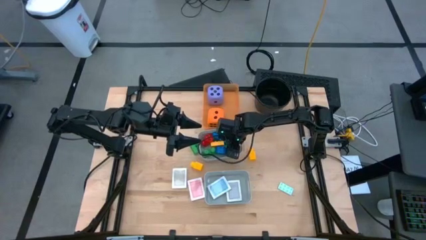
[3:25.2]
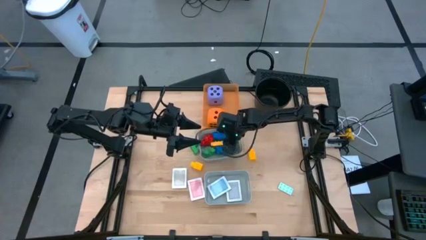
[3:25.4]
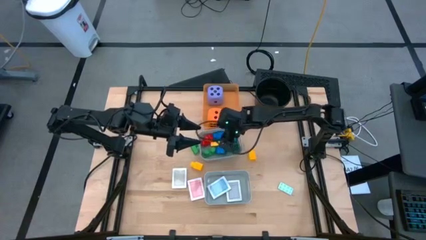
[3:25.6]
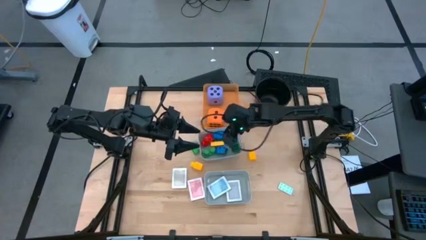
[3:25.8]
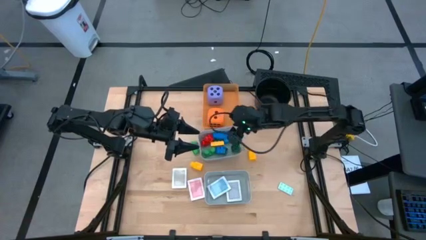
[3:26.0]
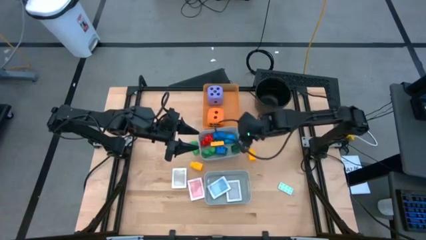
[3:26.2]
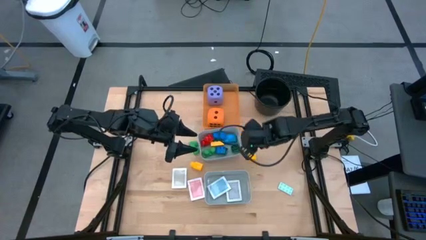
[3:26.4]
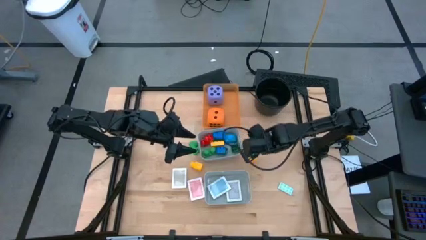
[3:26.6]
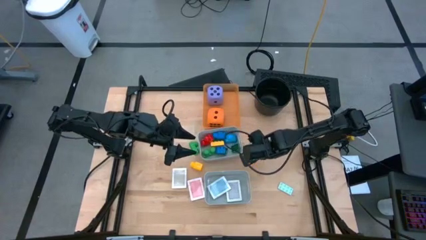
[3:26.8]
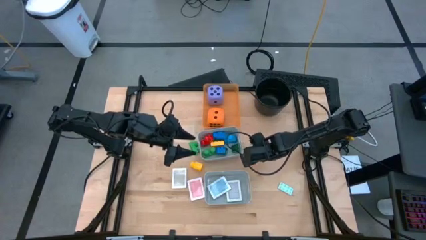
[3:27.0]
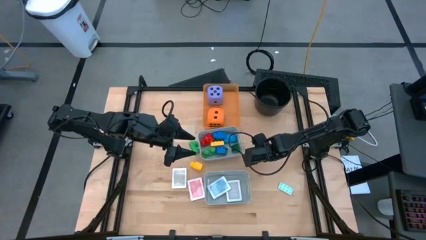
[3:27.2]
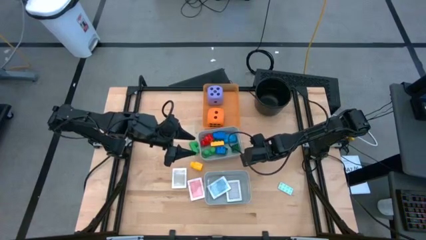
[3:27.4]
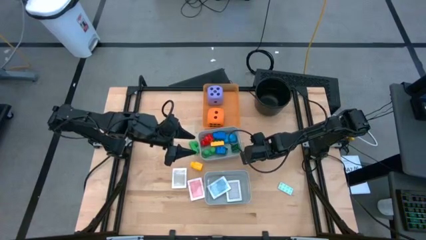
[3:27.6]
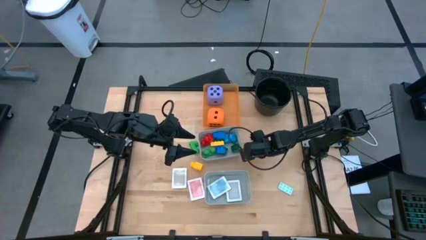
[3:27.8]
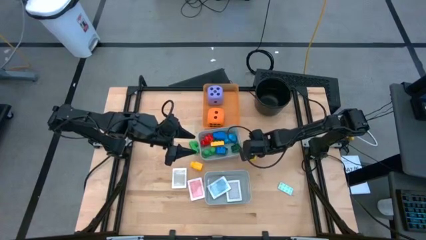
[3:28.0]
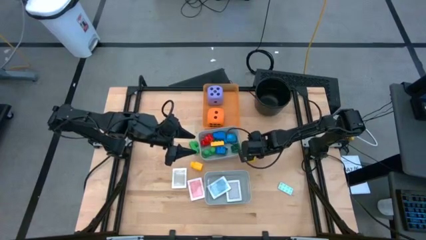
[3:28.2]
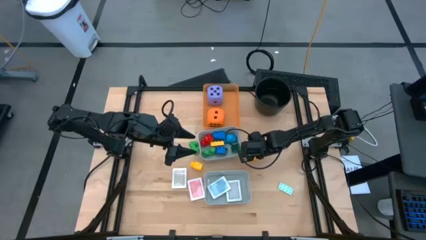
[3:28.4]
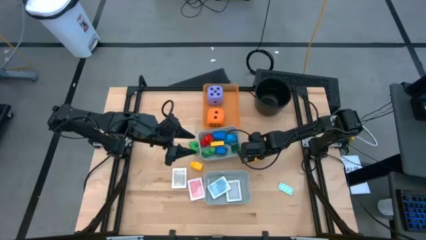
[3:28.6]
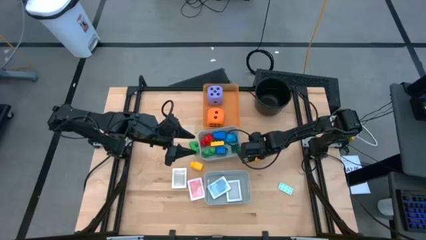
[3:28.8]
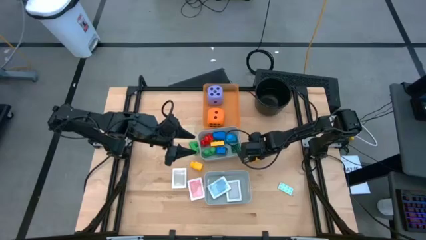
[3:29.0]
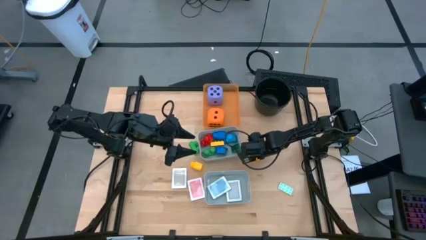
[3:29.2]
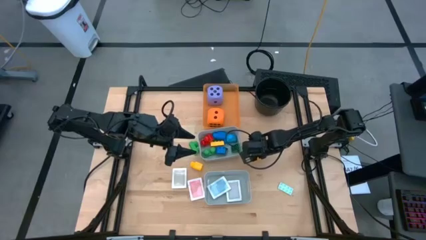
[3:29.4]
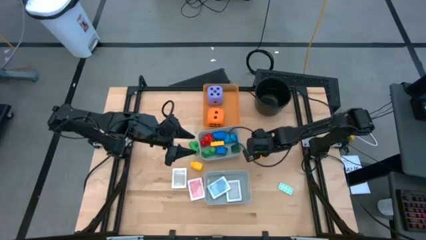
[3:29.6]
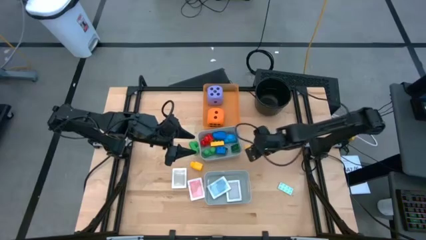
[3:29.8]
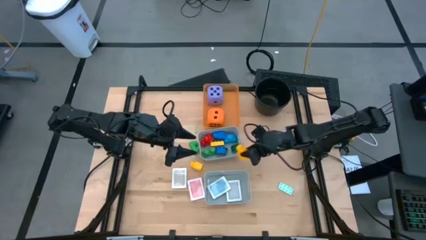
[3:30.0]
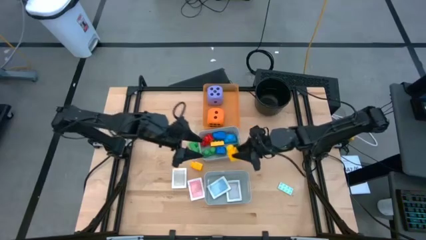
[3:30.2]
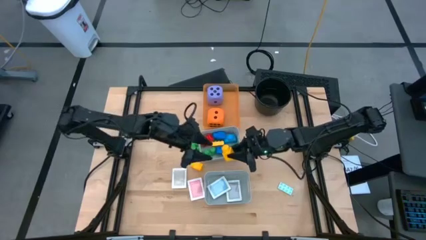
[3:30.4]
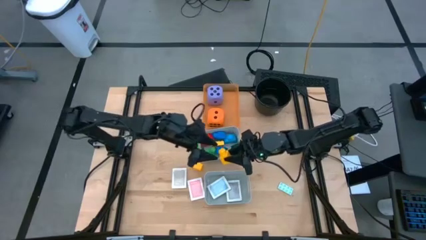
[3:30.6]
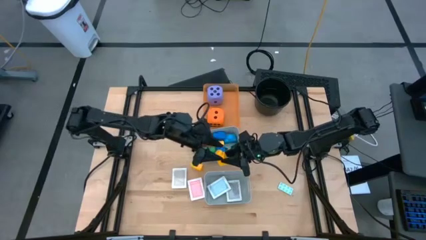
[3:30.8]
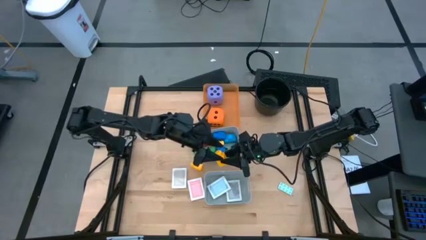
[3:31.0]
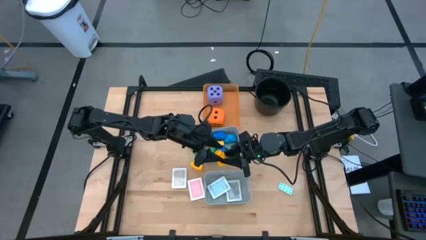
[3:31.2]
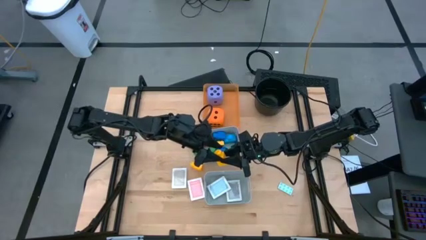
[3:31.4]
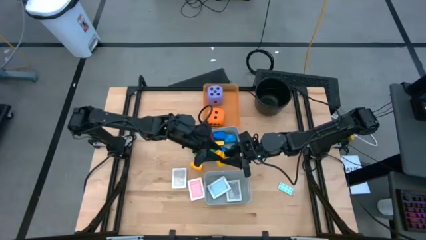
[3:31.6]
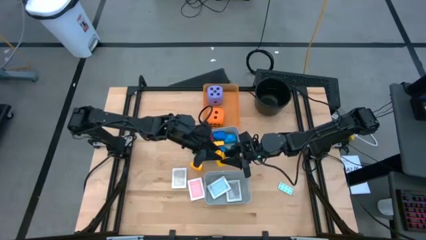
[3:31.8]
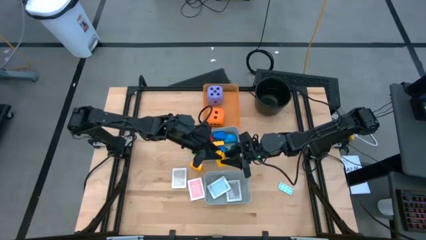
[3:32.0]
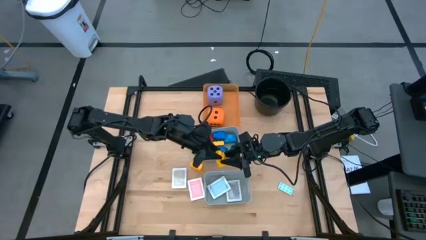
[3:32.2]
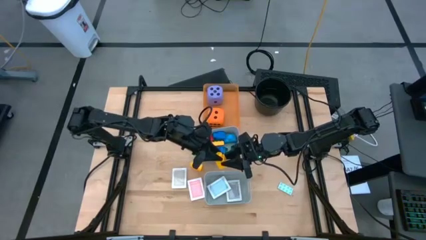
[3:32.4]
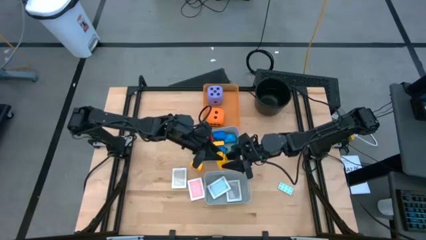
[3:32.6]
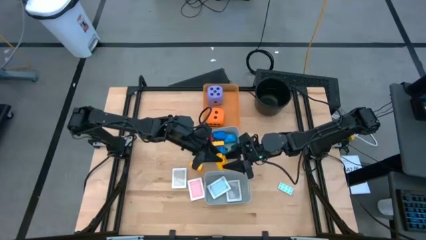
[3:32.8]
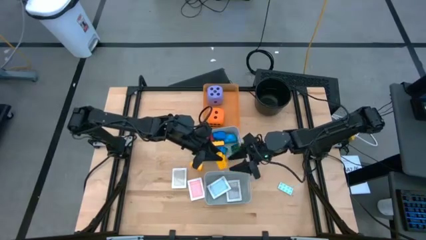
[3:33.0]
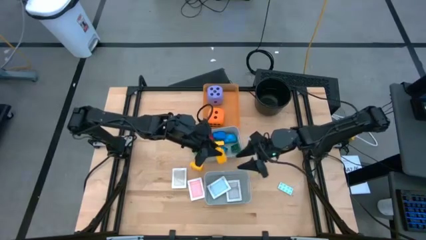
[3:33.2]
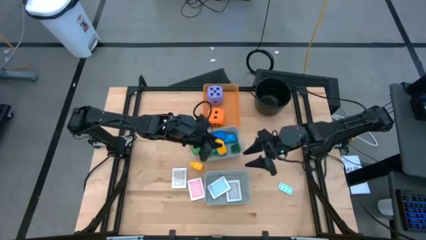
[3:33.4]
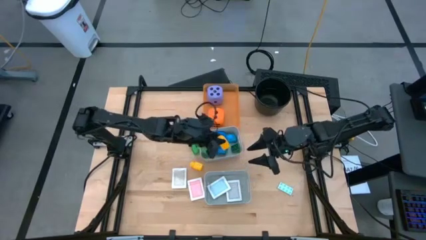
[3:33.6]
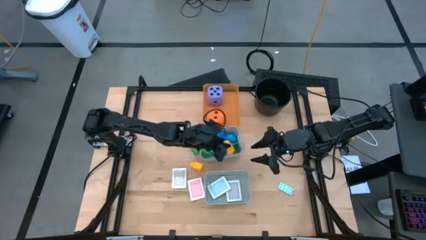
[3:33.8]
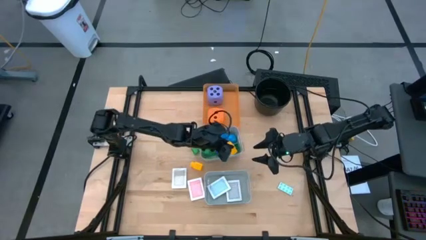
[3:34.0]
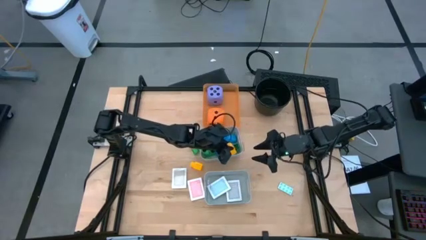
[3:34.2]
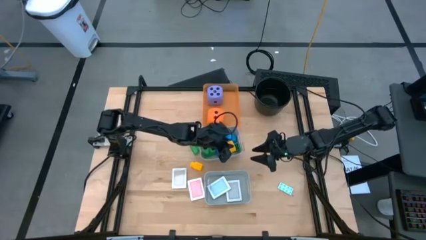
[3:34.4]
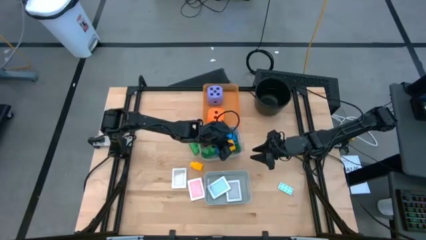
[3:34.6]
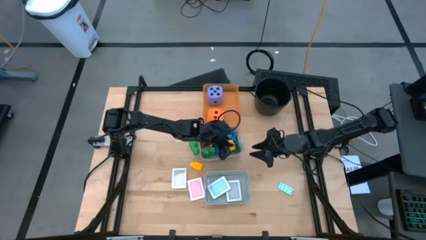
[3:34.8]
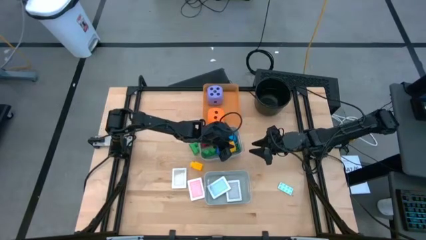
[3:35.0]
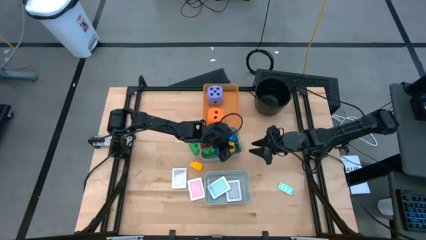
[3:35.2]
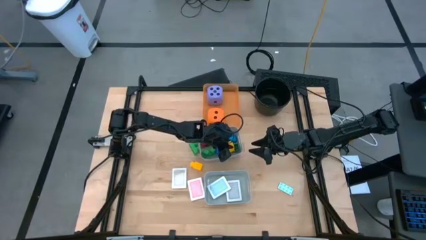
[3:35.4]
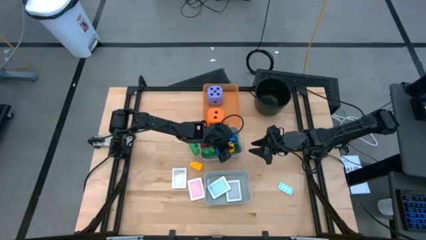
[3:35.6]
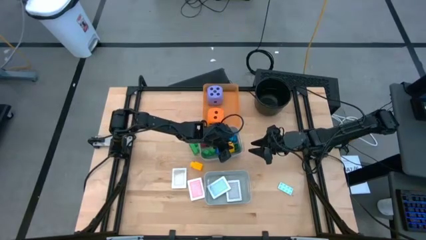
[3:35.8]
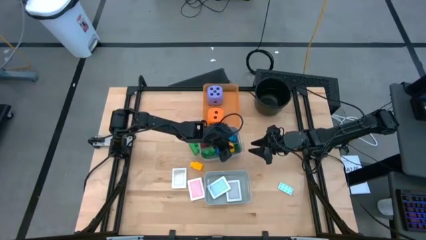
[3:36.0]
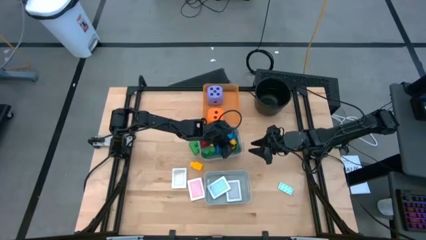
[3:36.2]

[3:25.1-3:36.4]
Task: Pick & Place Toys
Put the right yellow game piece into the top gray bin

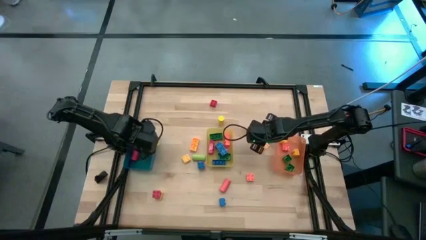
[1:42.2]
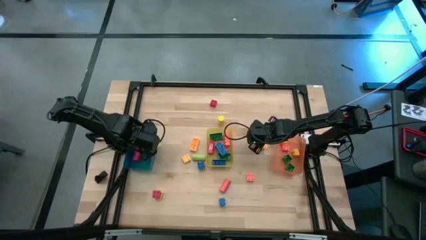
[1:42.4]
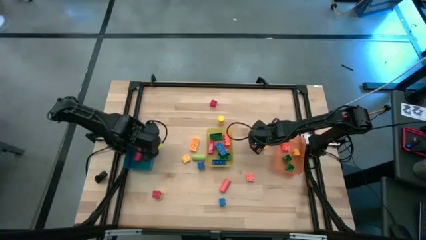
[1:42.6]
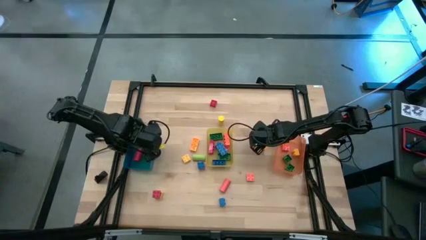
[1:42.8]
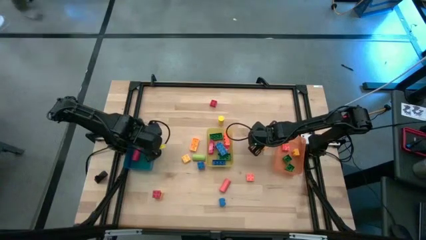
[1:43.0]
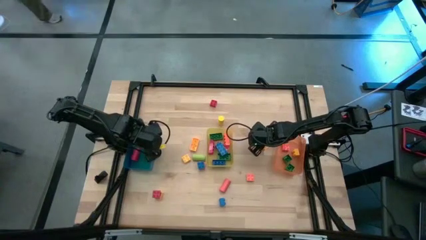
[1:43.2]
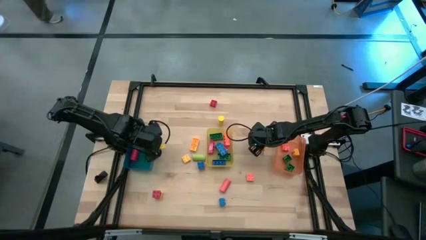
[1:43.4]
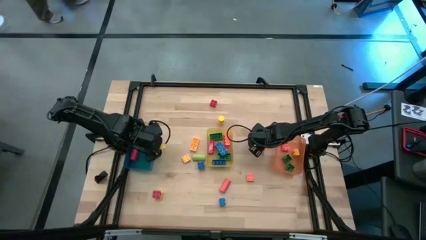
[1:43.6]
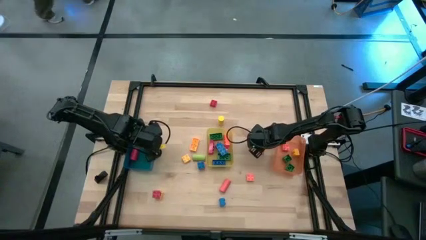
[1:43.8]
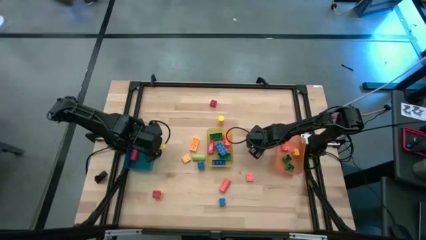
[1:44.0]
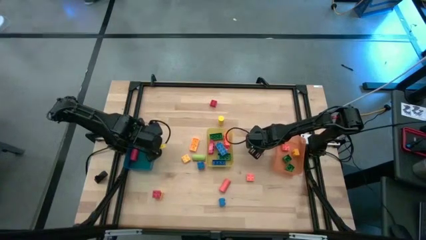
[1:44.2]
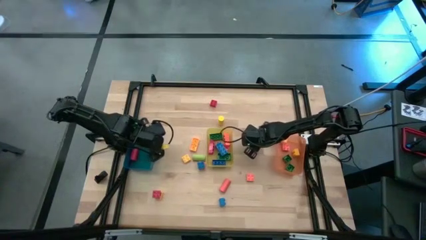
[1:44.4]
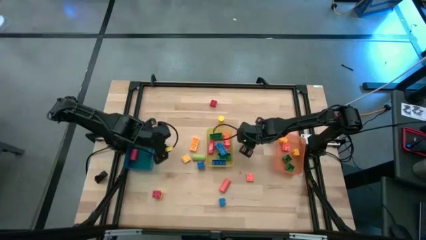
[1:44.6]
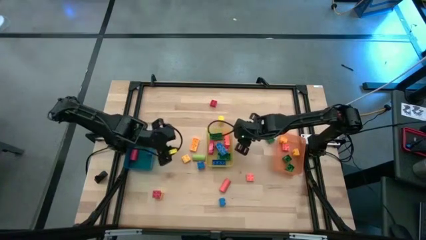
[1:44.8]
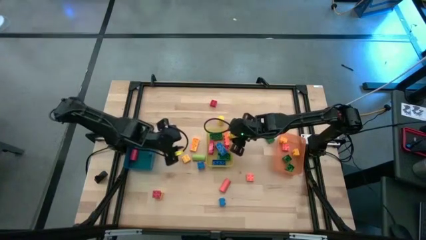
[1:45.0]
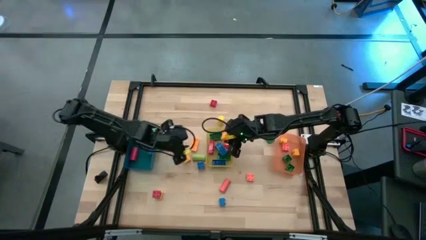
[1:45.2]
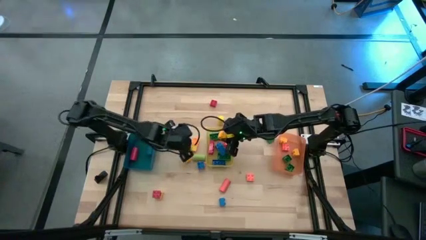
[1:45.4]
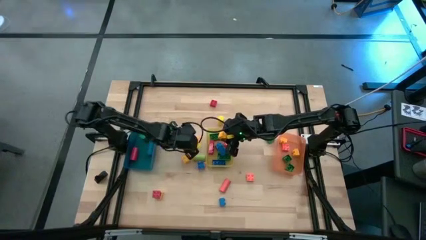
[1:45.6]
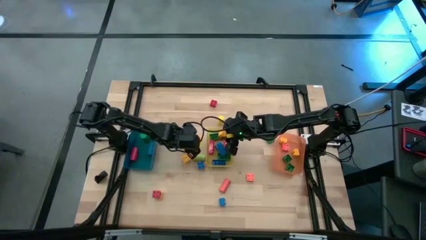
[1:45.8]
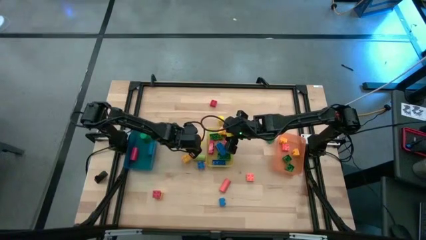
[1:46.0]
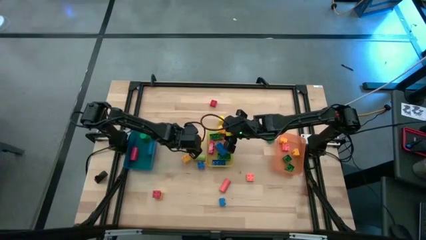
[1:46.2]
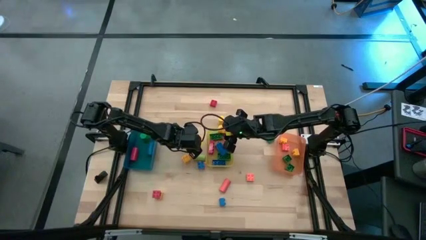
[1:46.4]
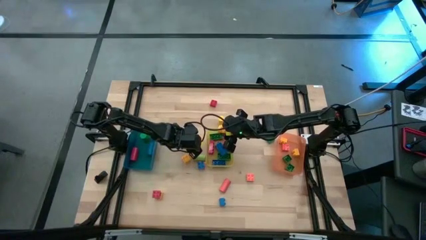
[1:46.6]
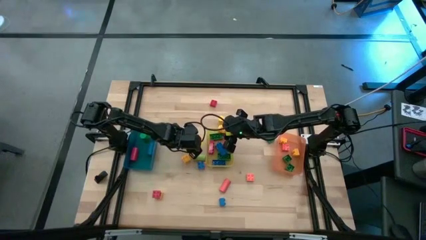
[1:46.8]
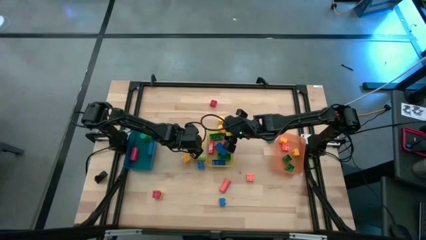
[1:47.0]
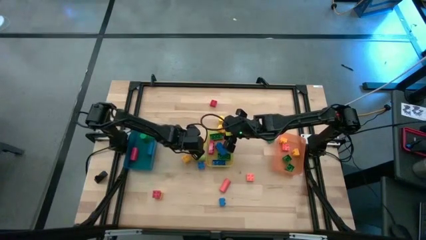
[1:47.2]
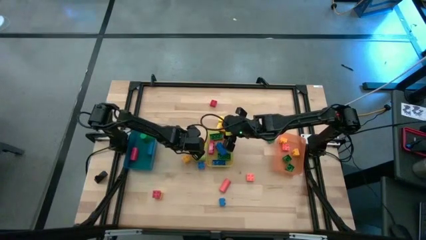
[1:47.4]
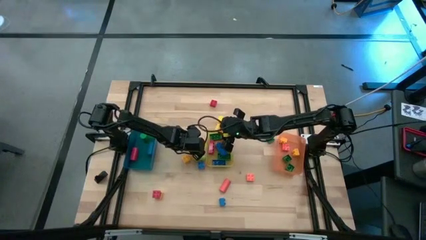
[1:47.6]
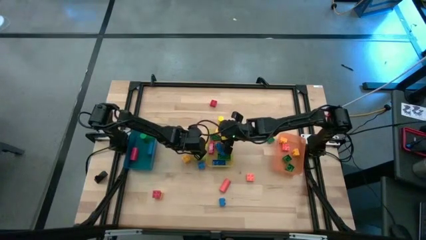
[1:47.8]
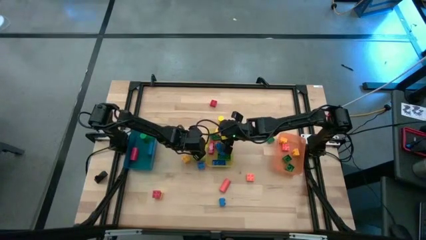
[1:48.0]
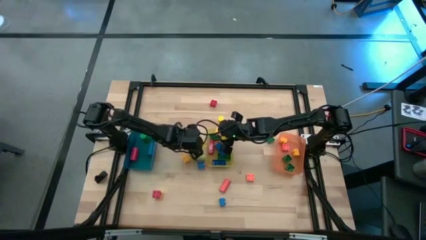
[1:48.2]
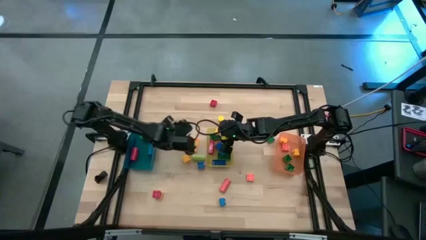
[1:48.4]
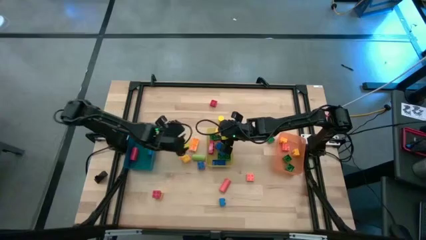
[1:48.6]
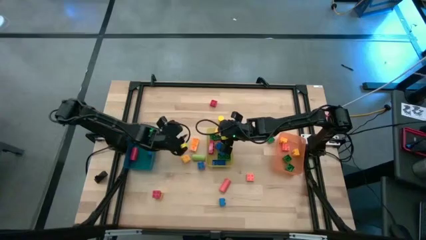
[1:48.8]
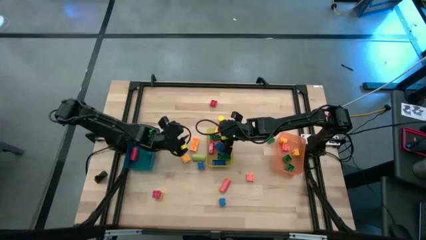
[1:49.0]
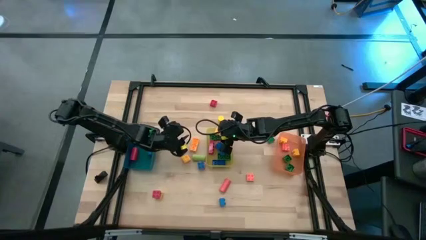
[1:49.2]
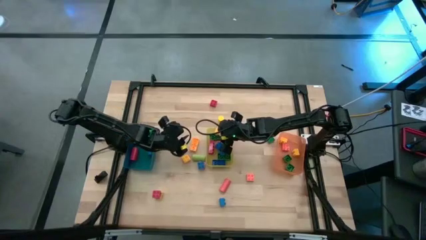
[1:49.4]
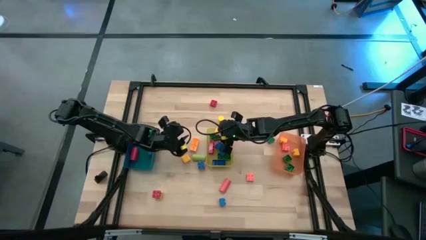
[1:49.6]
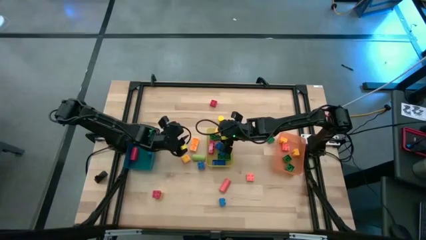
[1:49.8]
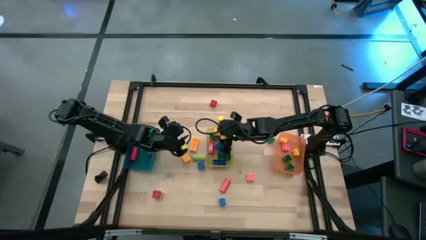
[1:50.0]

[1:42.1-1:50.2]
Task: Sort blocks by size
Put the yellow 8 stud game piece into the yellow bin
